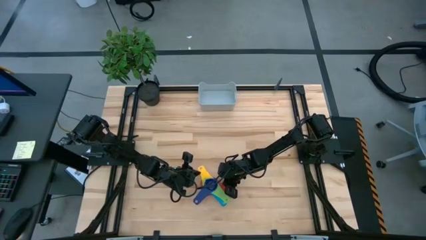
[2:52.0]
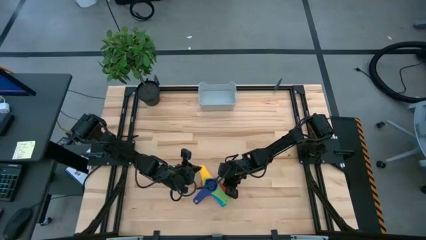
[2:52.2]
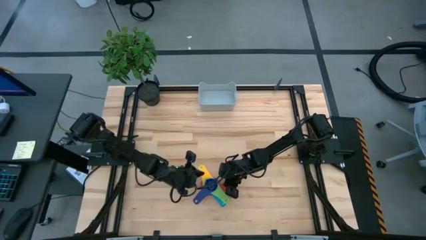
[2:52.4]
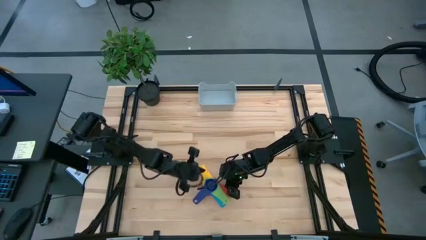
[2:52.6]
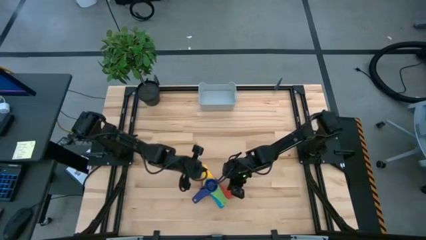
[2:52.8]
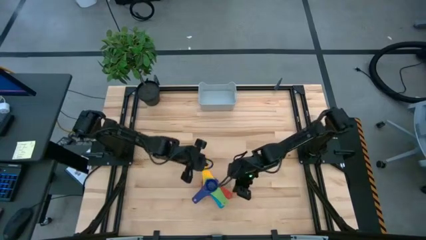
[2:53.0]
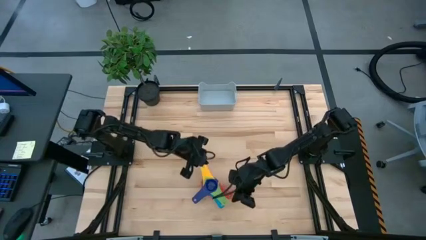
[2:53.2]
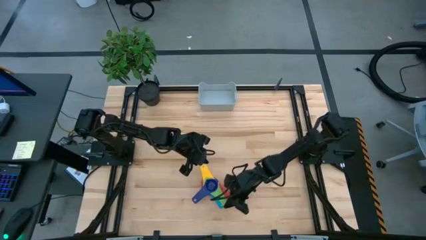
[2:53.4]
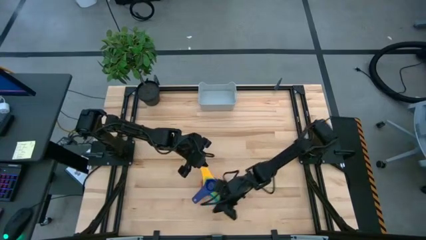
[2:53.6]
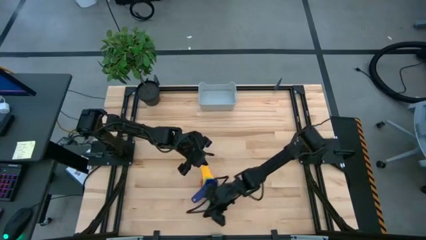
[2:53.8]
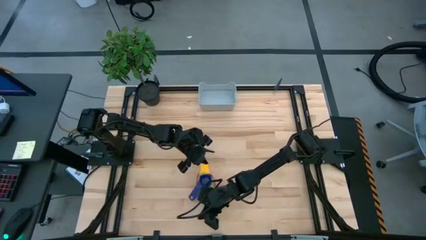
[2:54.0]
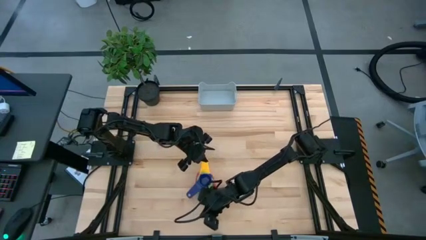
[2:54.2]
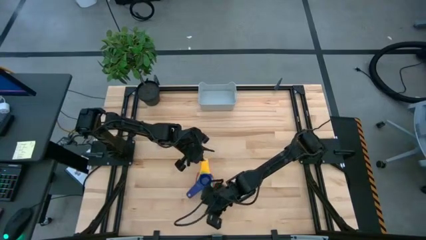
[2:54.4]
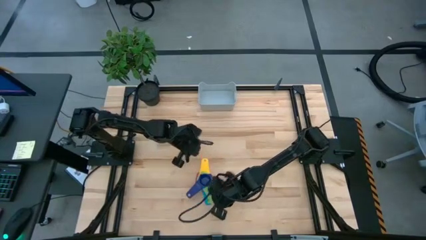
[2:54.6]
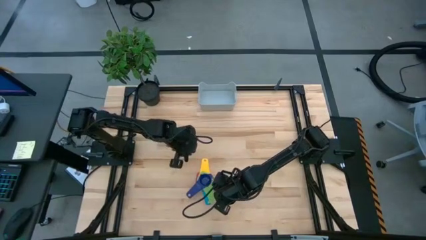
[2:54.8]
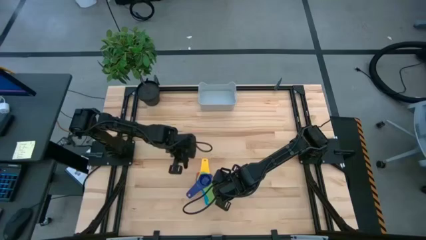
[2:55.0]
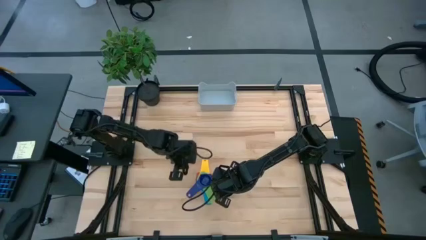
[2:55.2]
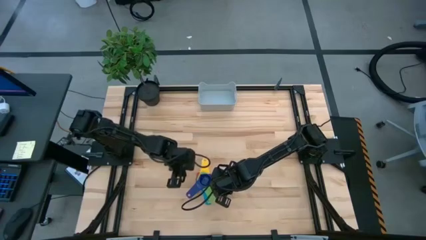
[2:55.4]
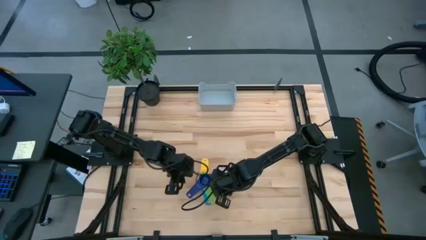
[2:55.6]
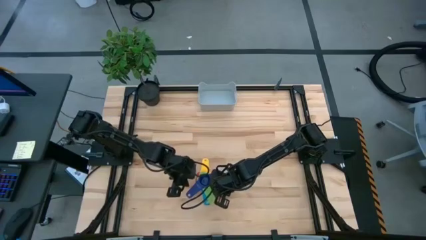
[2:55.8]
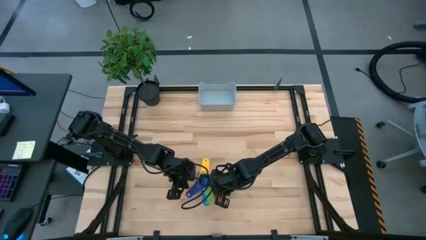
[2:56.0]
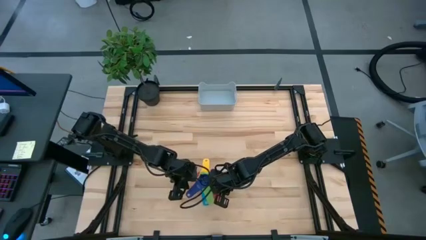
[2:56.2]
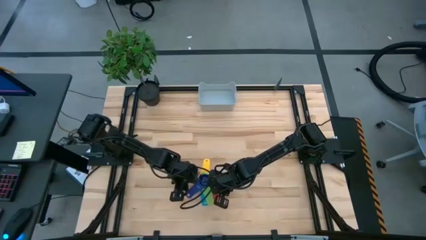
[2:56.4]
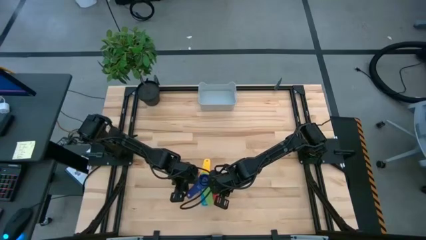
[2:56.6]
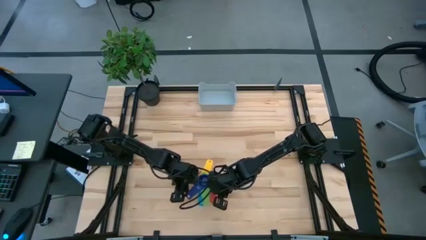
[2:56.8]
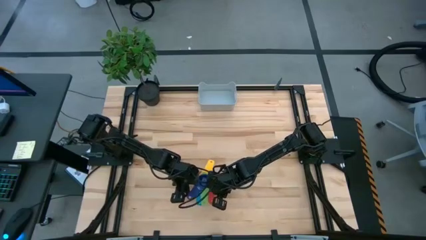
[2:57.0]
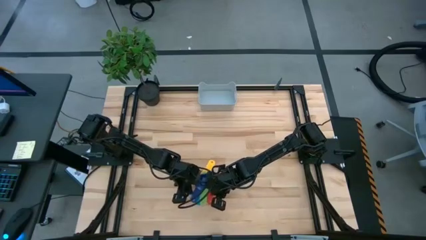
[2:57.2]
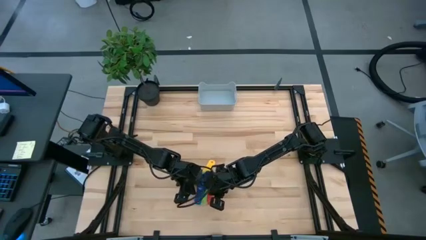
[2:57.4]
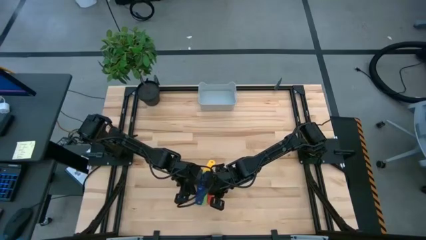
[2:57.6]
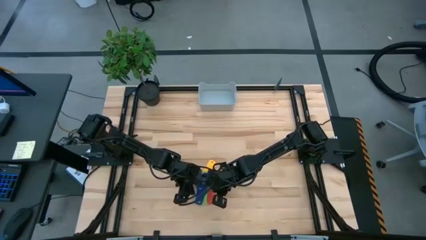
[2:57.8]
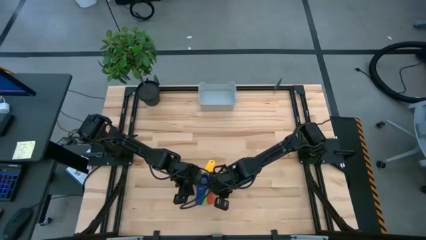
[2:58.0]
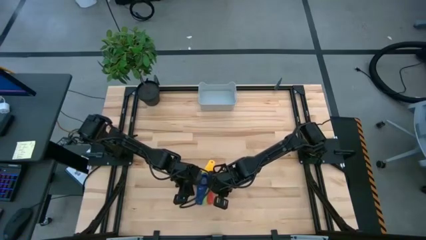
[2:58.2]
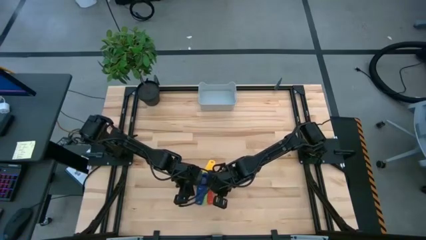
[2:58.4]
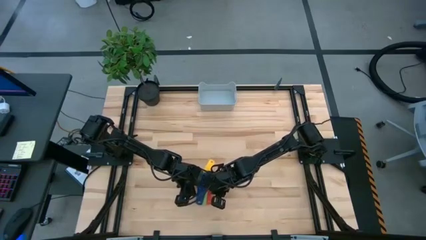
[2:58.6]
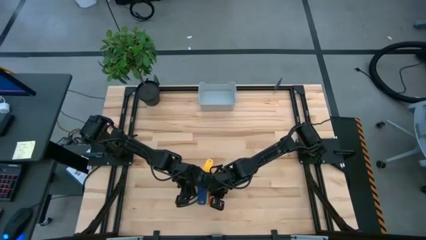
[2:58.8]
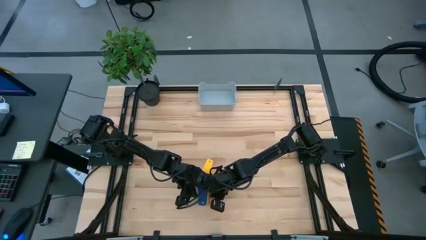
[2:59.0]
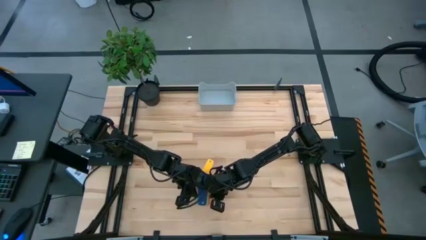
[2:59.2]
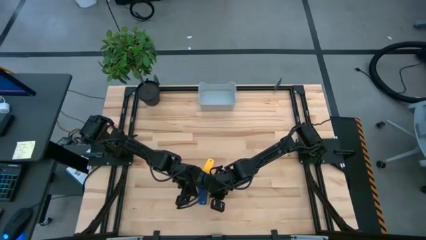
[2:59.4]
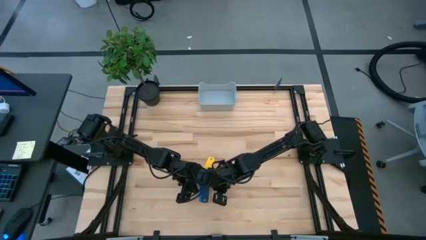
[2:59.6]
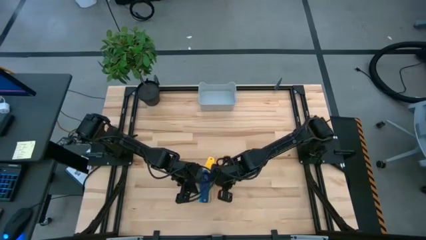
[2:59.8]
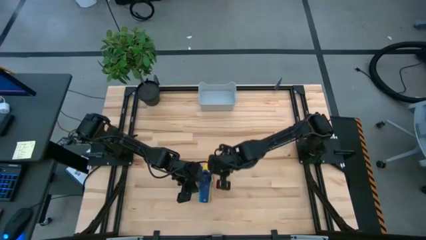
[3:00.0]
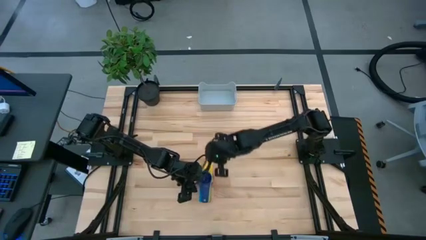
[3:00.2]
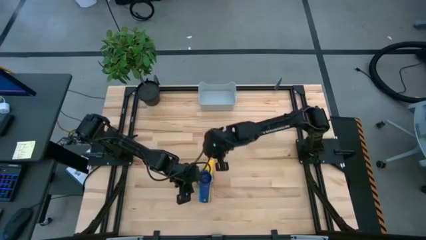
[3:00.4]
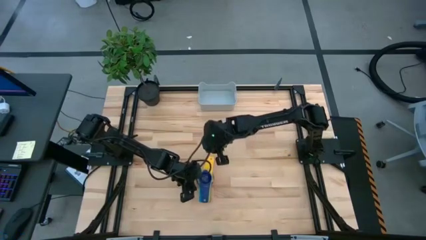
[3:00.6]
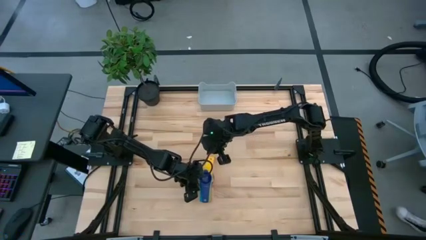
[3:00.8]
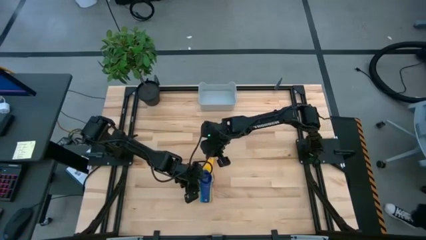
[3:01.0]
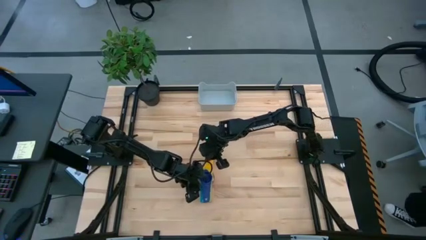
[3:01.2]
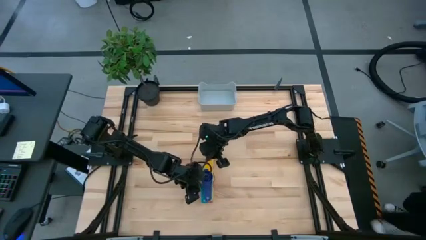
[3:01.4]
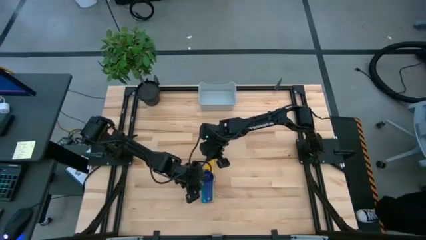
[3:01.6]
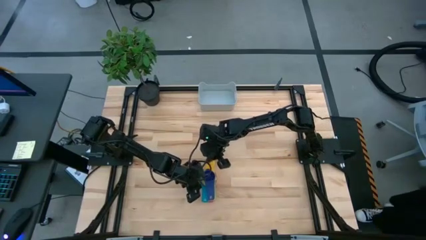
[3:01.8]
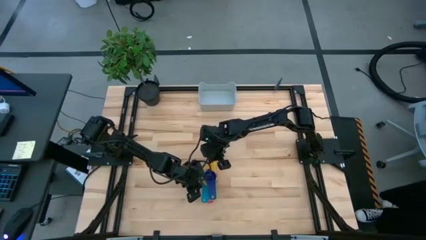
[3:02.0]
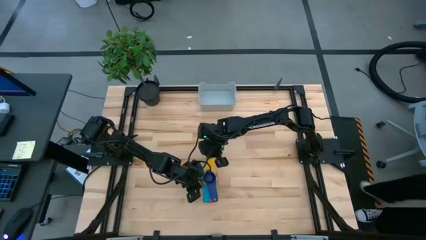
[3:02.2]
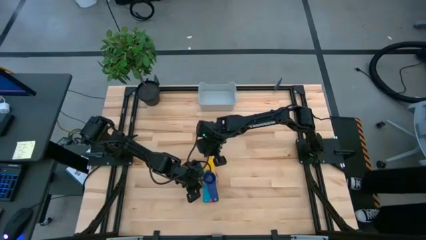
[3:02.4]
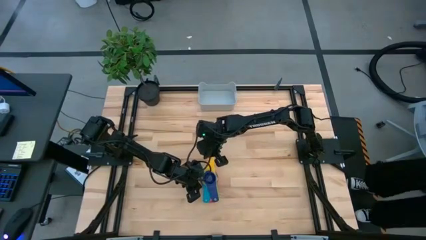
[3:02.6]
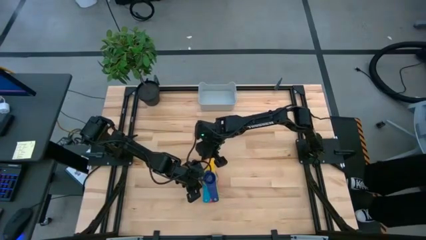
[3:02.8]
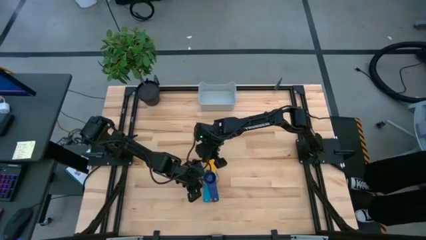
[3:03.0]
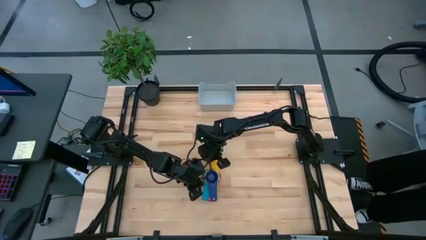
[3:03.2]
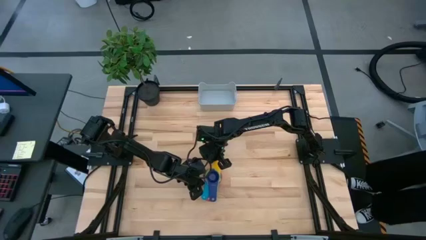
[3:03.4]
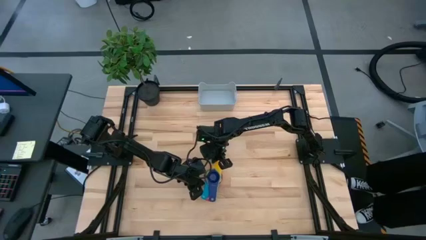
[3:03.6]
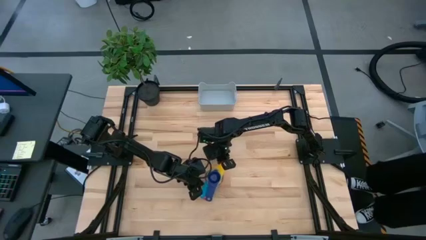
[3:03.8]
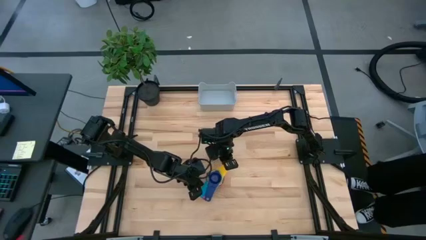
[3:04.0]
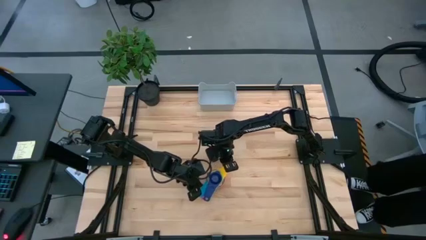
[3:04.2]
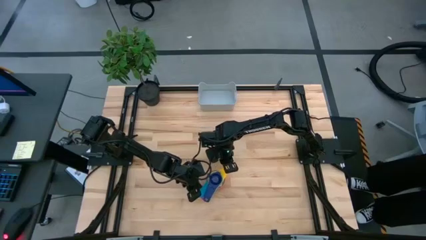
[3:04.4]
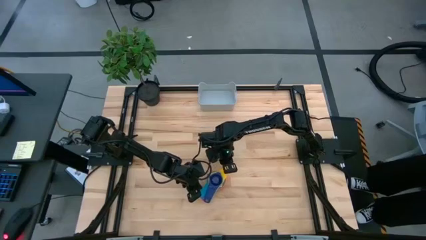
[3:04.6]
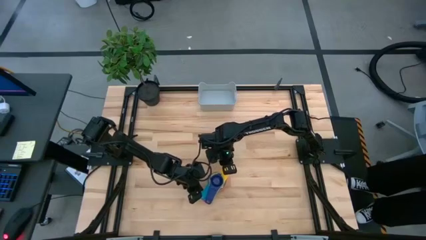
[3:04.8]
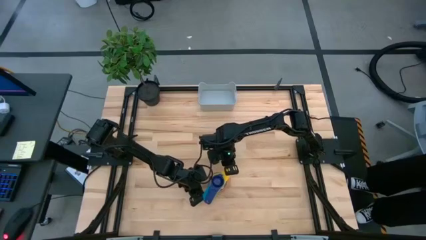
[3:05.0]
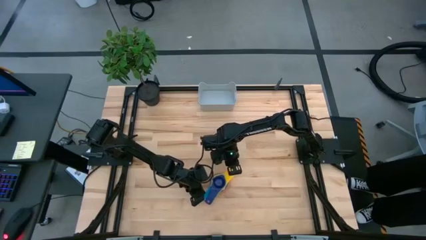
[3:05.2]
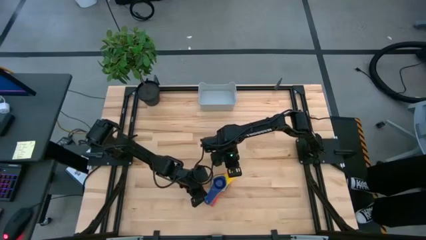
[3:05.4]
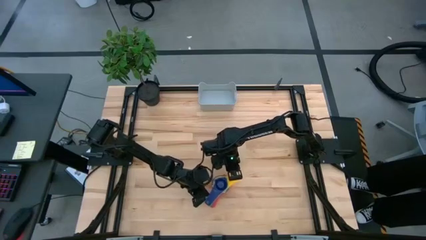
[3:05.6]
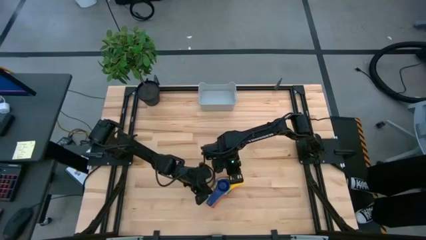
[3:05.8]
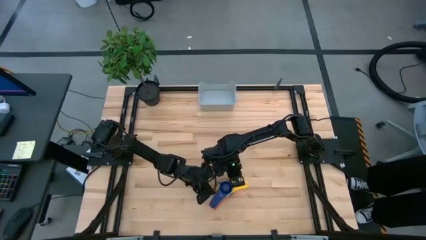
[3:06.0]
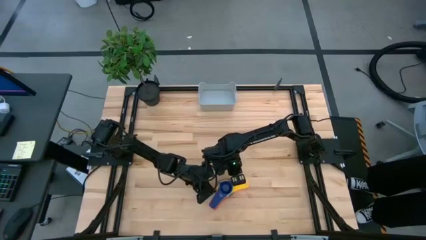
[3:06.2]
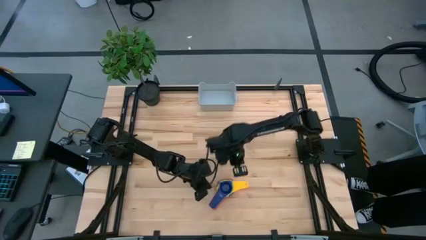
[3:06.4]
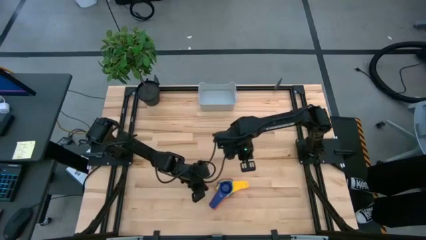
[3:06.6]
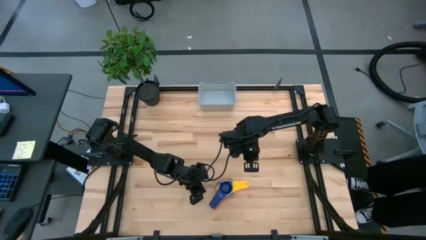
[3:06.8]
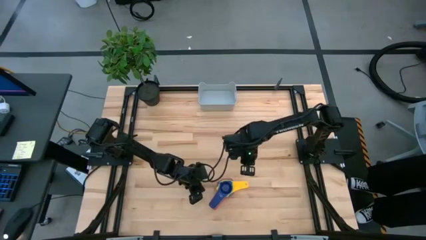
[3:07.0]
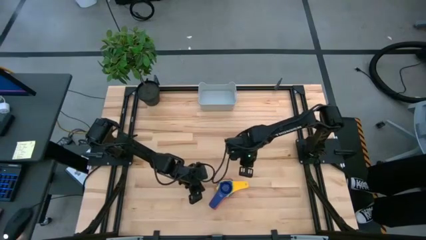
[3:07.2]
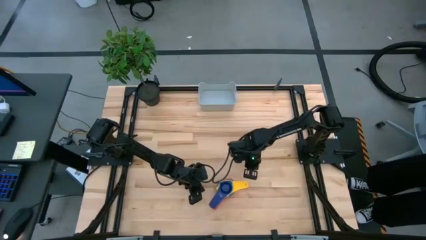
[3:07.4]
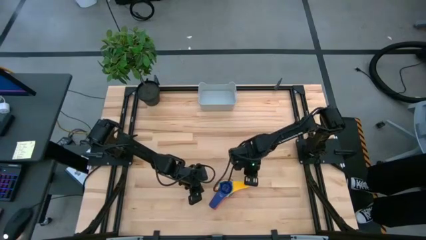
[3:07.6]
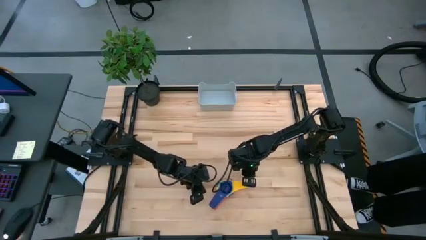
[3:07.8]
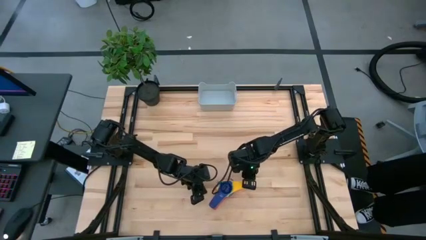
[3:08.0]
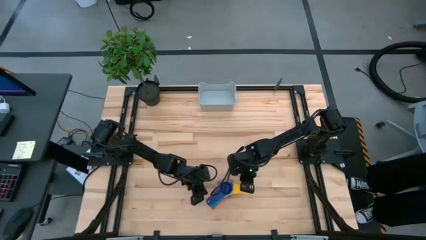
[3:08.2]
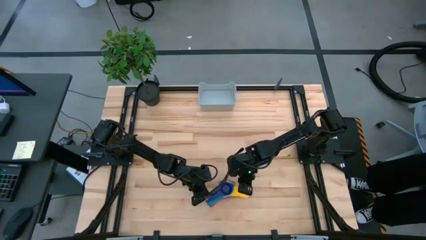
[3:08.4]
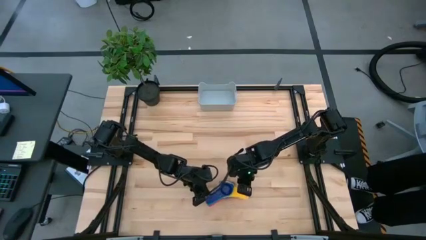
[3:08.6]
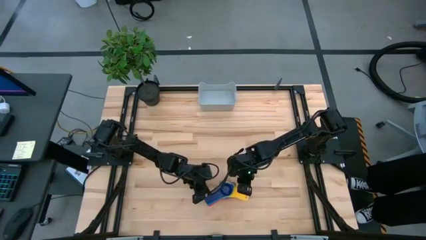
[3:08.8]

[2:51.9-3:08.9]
Task: Nest measuring cups in basket
Adjust the stacked measuring cups on the table
